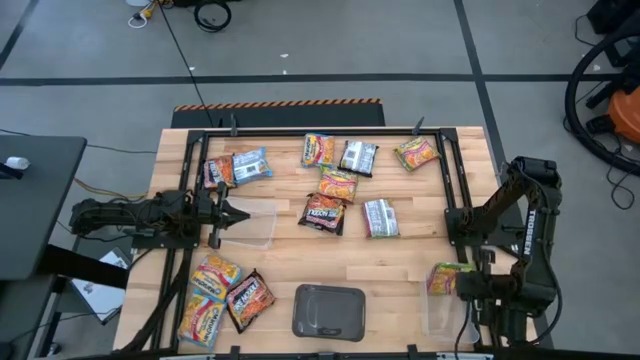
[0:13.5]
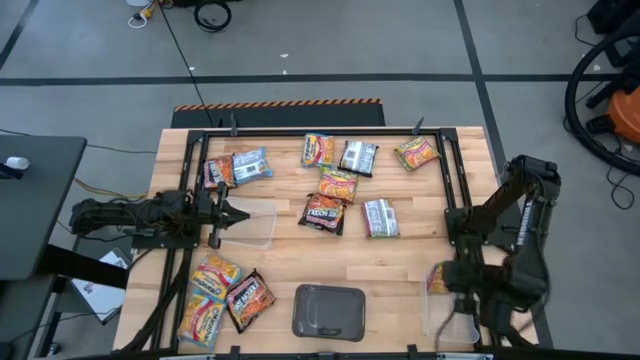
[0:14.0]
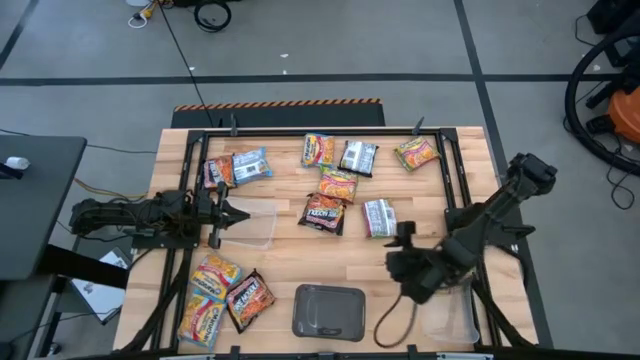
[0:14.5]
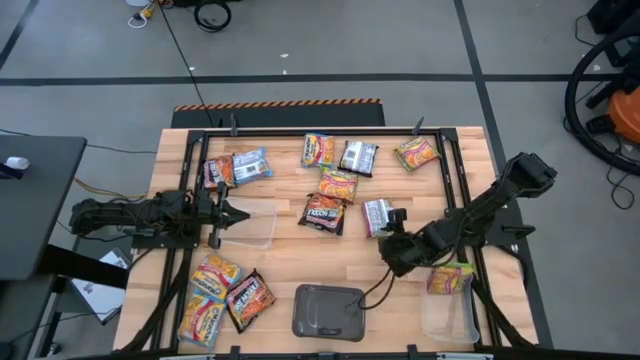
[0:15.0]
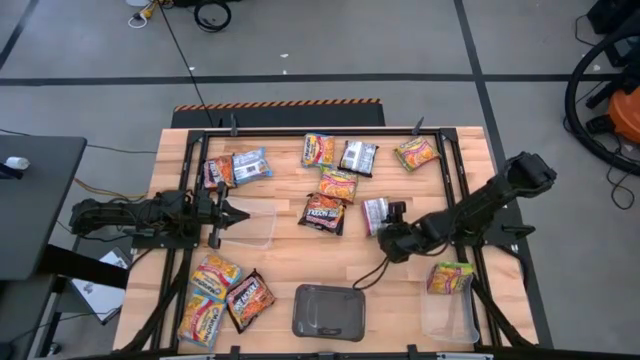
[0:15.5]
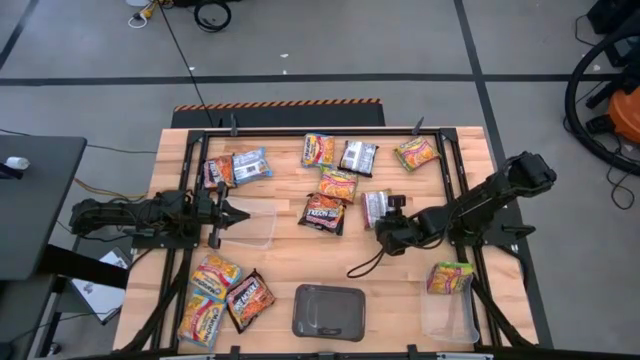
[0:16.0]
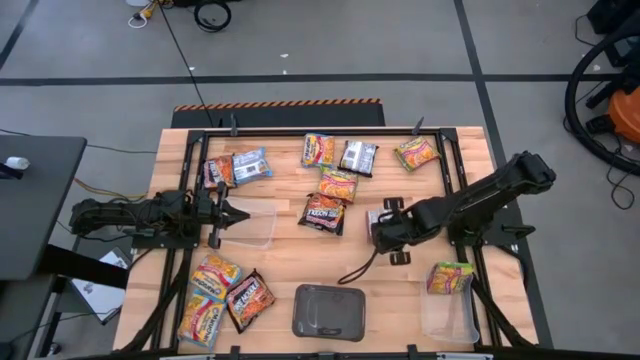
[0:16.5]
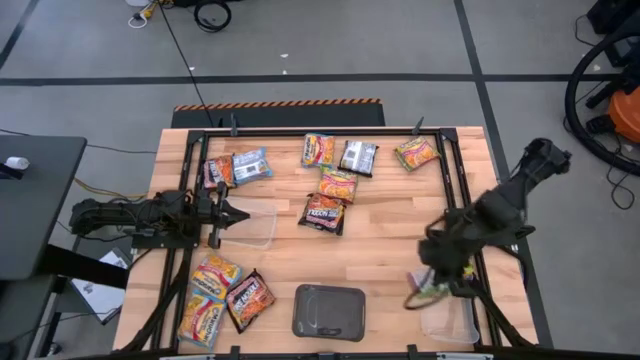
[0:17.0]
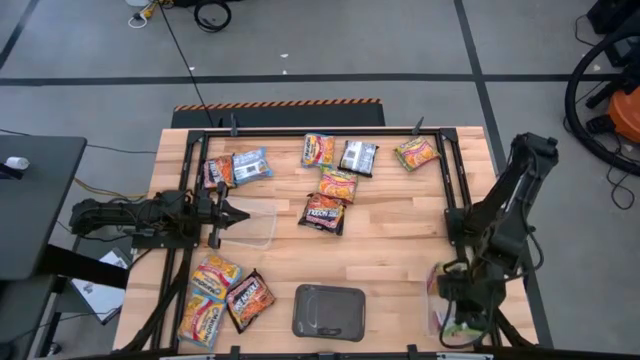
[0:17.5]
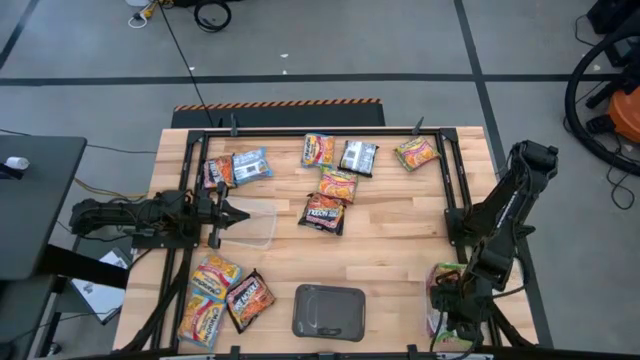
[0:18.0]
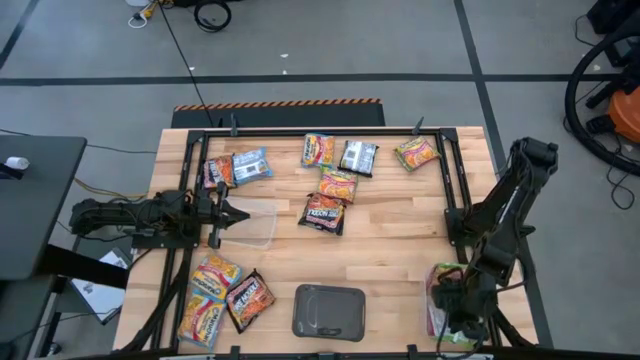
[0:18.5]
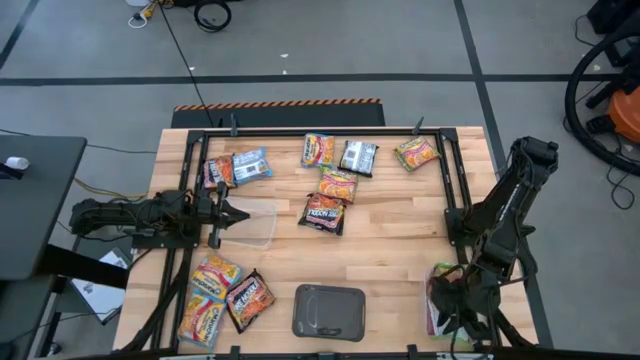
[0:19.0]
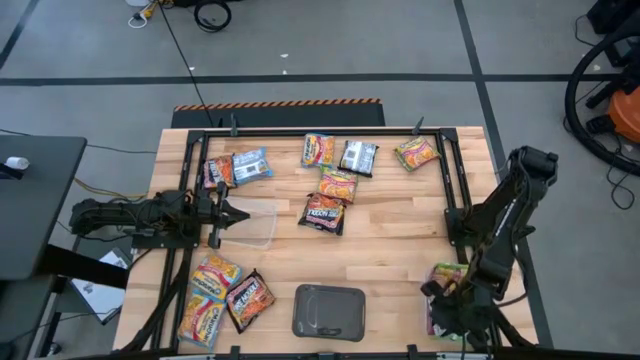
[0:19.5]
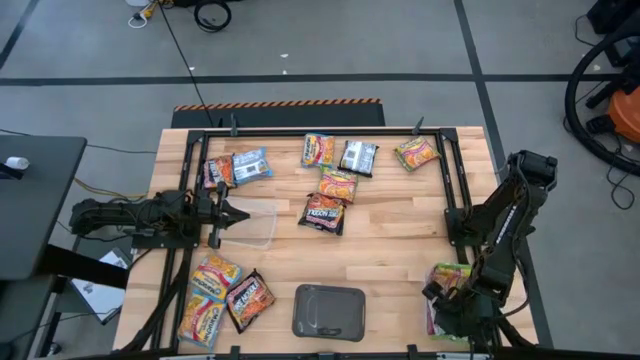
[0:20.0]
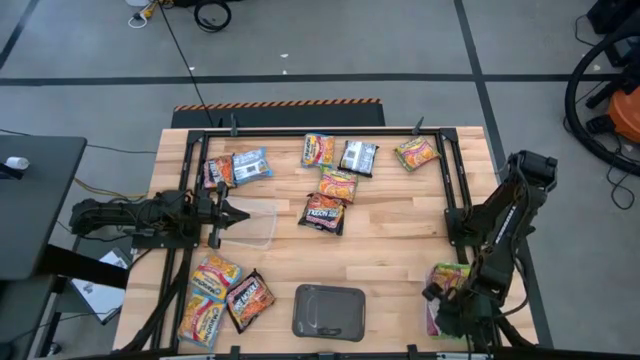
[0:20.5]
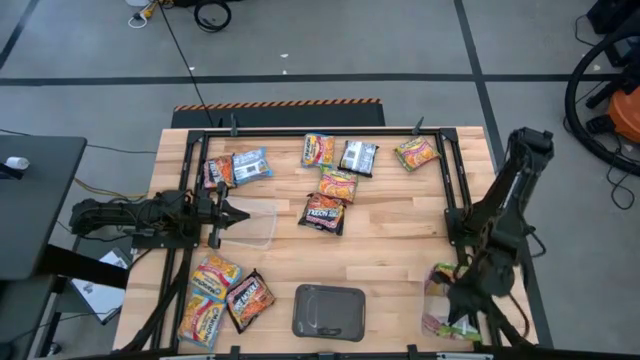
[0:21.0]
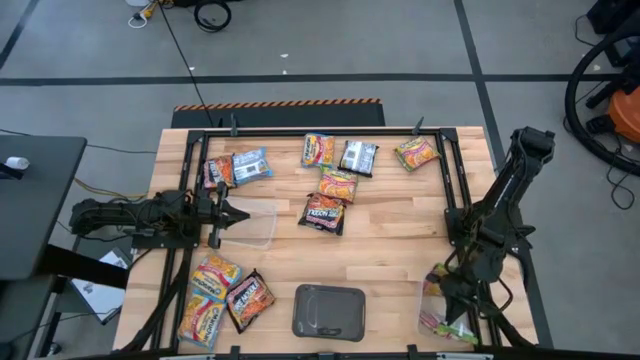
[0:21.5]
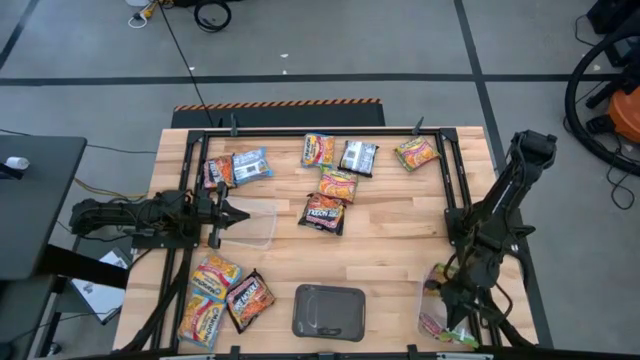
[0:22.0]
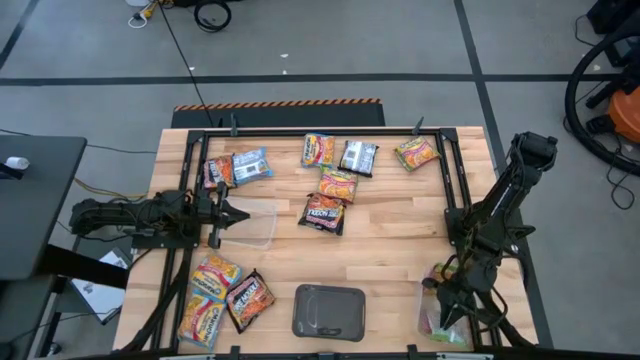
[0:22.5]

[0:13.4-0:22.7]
Task: Sort Maruchan noodles
Put the bottom green noodle pack into the bottom transparent bin

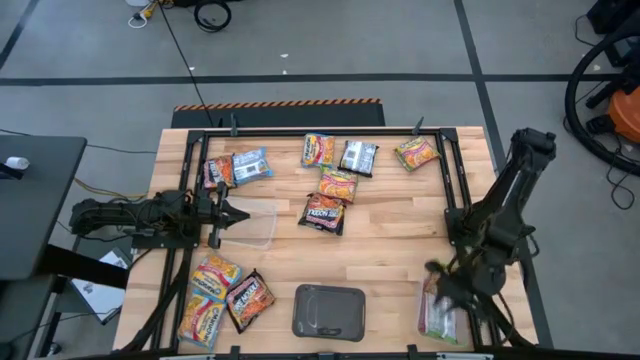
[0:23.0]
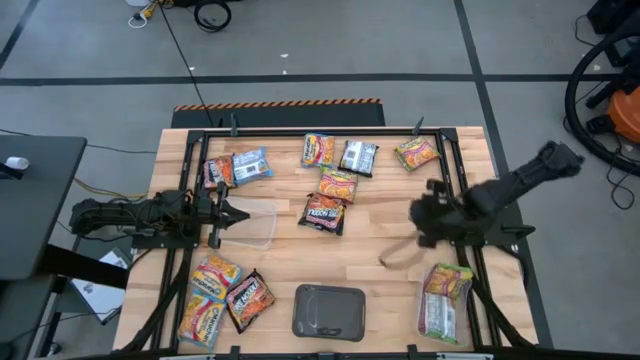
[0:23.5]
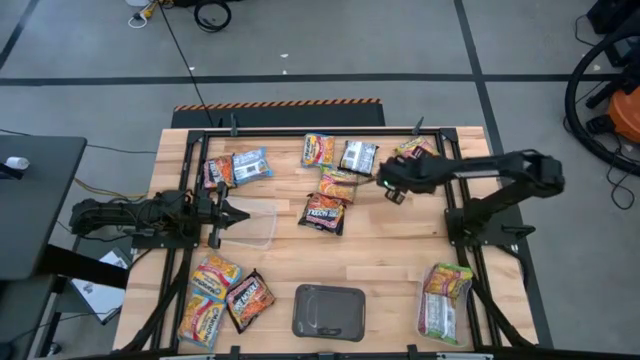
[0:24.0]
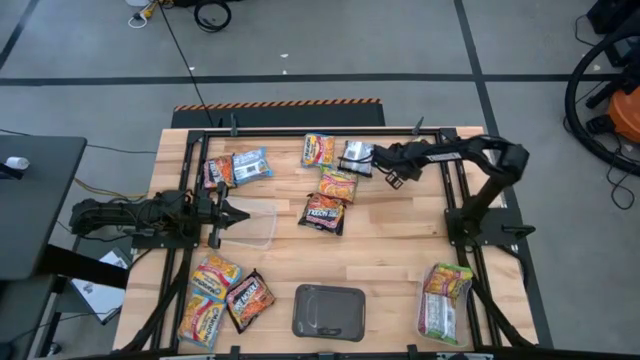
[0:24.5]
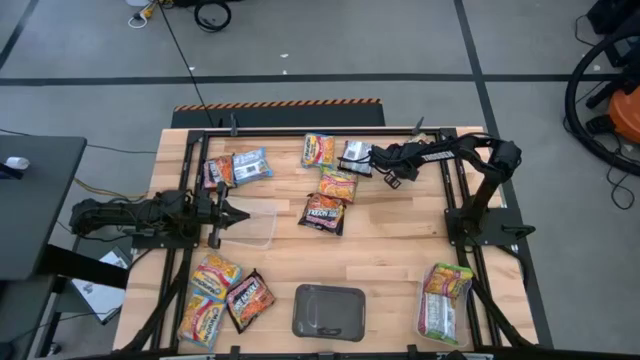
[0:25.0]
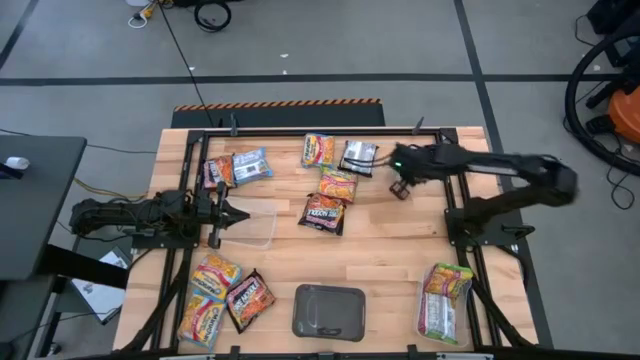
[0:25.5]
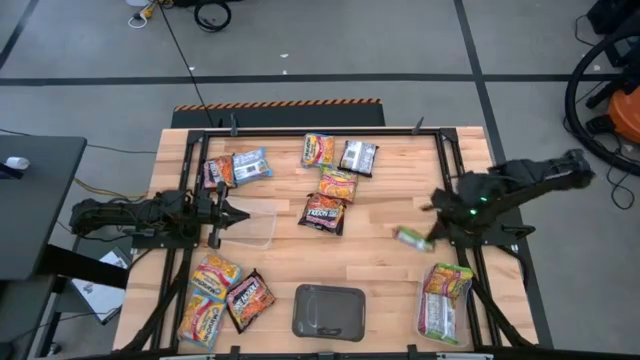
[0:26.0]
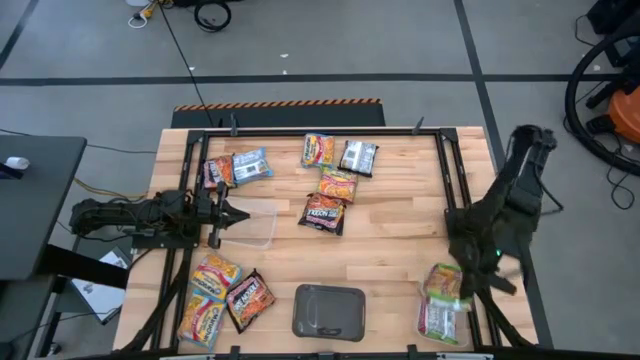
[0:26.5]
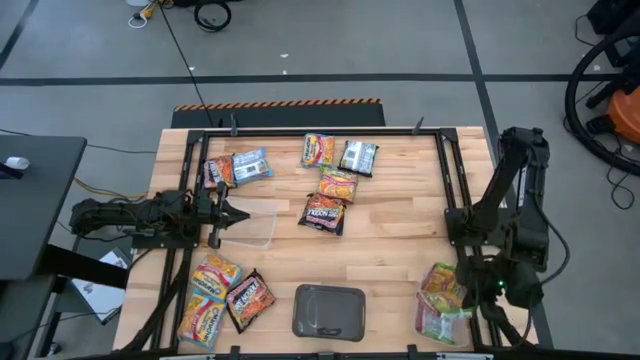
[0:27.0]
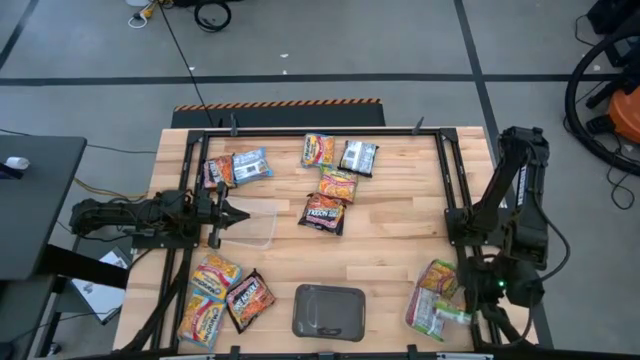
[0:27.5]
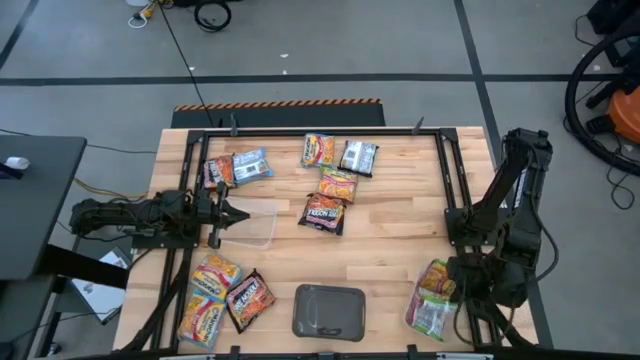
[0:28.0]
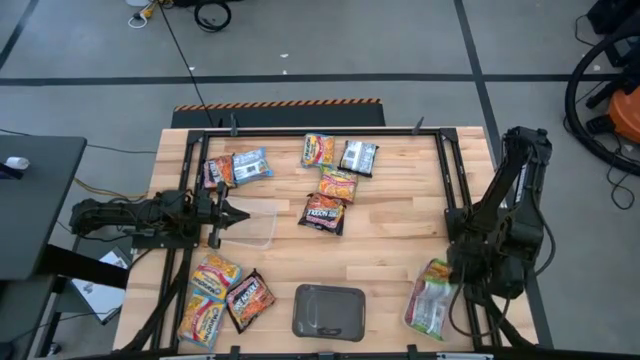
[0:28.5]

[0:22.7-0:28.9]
Put the top green noodle pack into the bottom transparent bin

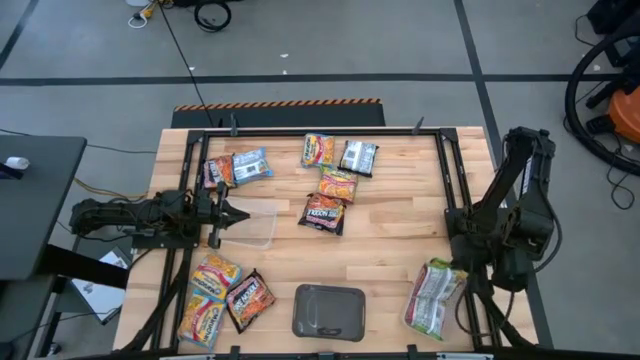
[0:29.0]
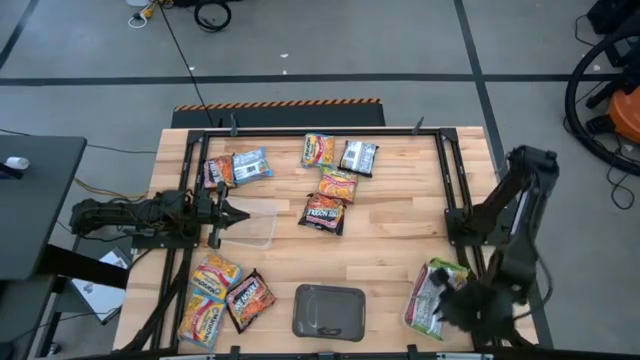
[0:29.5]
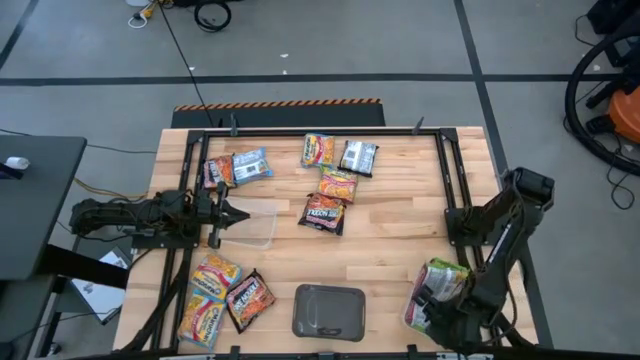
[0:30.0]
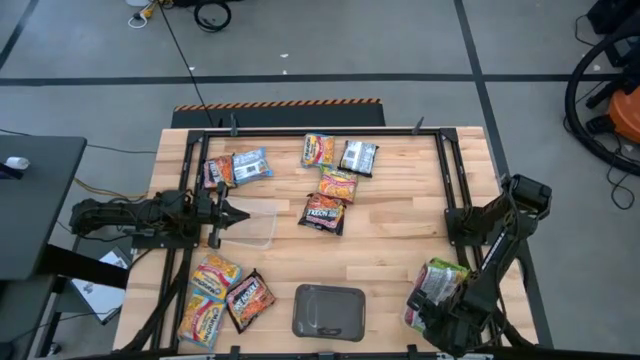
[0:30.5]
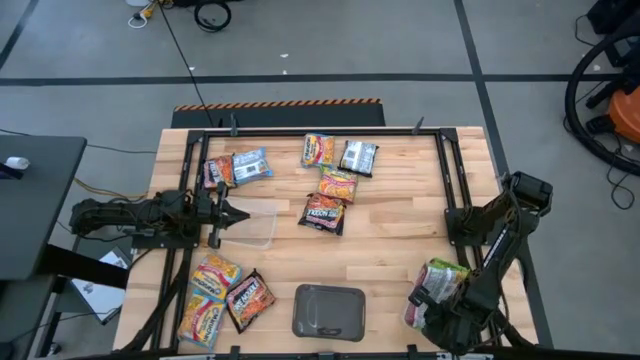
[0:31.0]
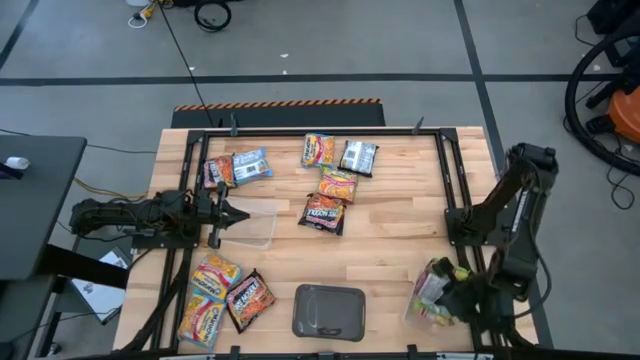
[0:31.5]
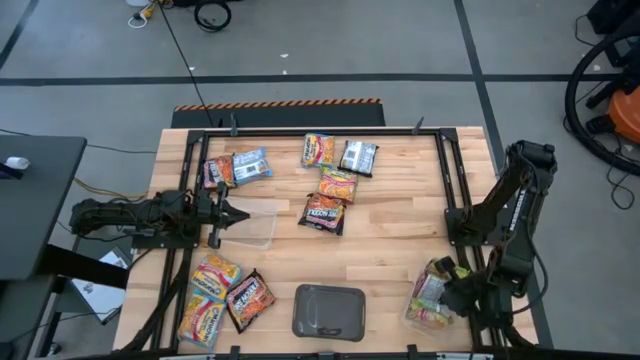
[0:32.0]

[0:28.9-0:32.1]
Adjust the green noodle pack in the bottom transparent bin

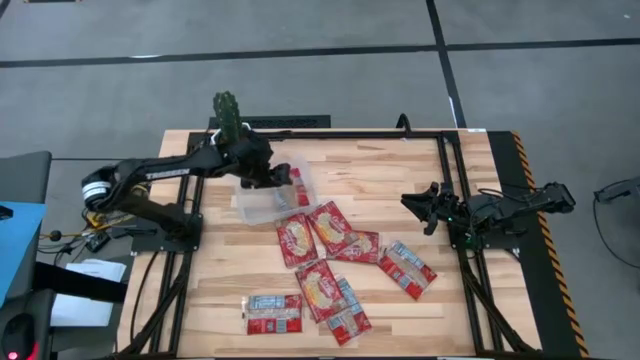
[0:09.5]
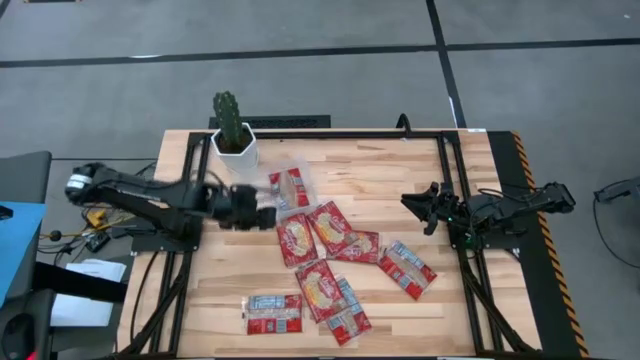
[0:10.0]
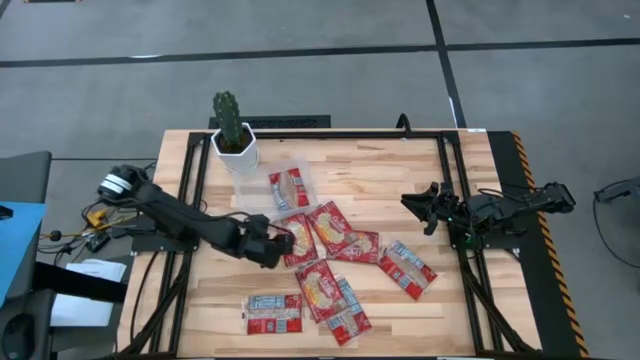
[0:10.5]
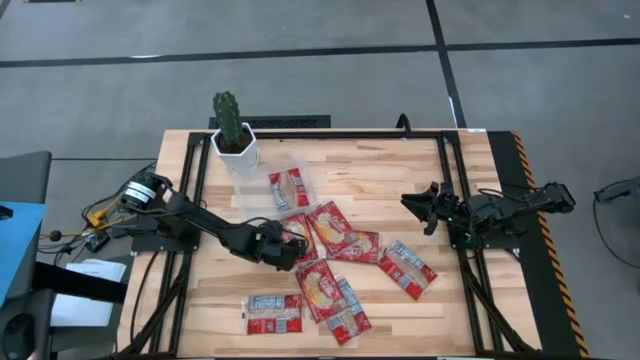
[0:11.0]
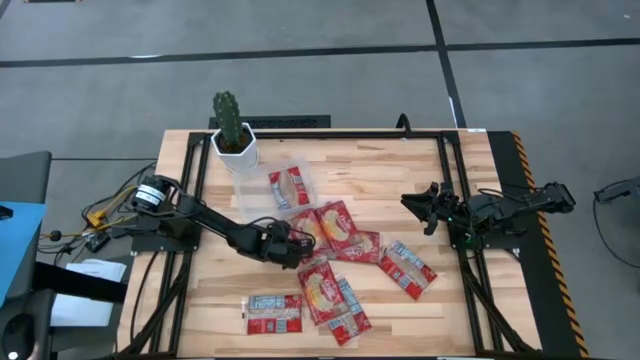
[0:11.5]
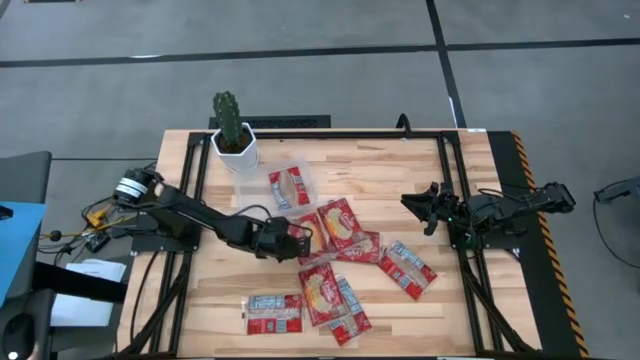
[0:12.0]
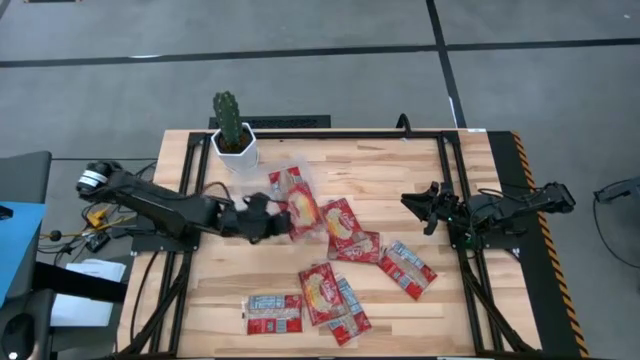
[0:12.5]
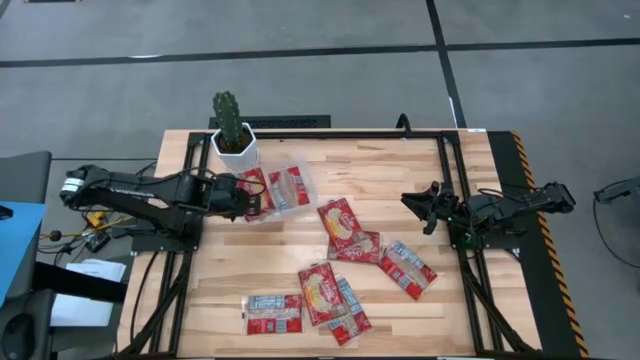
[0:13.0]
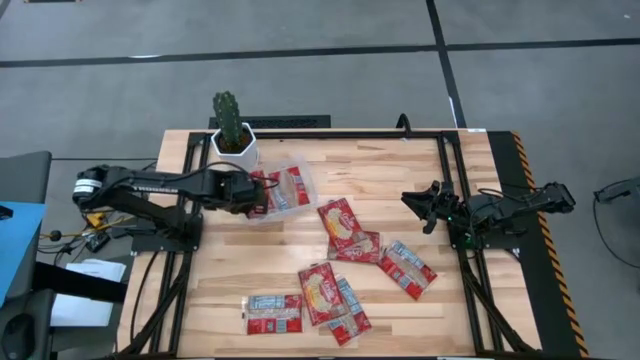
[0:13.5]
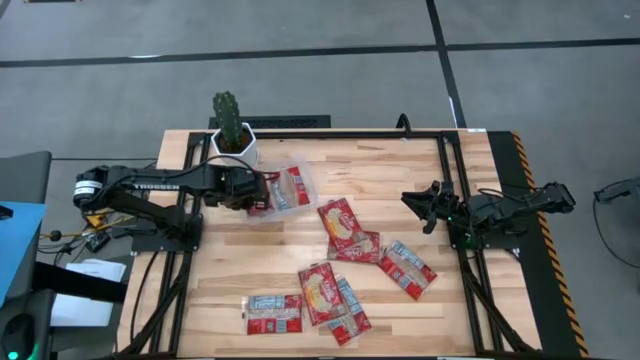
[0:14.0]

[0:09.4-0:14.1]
Task: Sort popcorn bags into baskets
Put the red popcorn bag into the transparent bin
